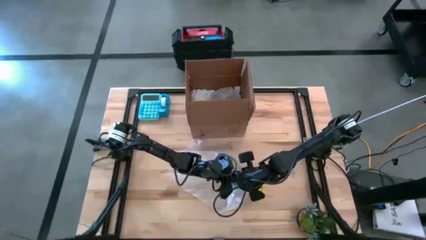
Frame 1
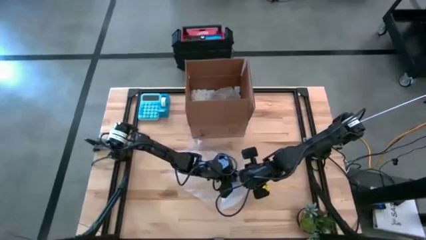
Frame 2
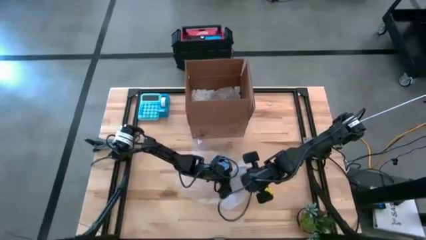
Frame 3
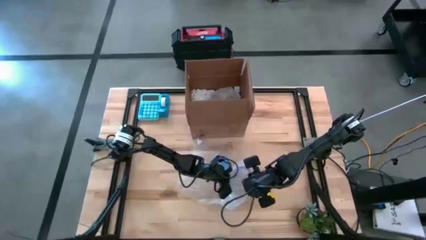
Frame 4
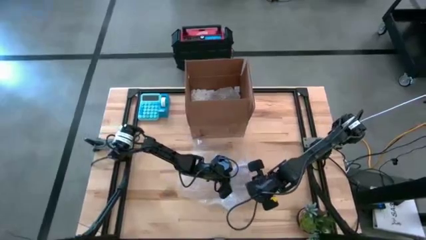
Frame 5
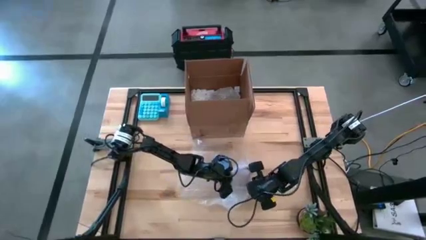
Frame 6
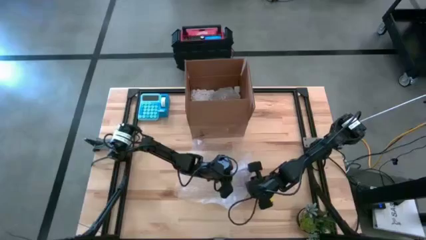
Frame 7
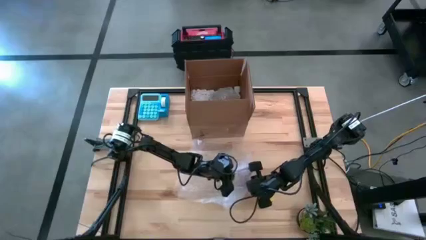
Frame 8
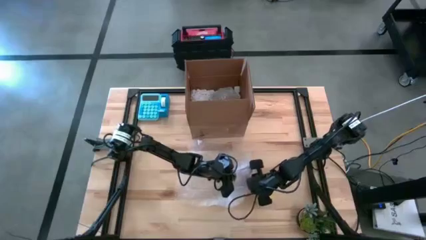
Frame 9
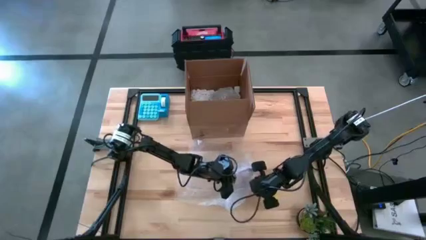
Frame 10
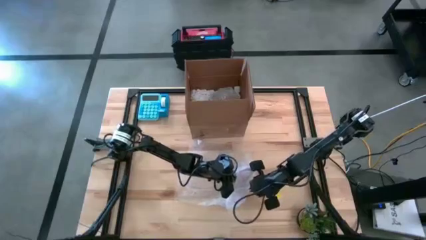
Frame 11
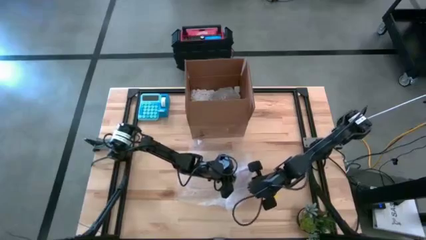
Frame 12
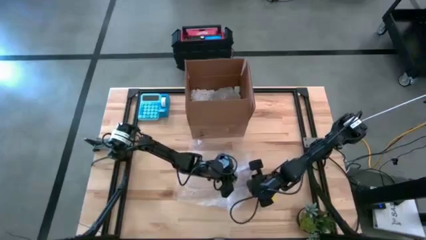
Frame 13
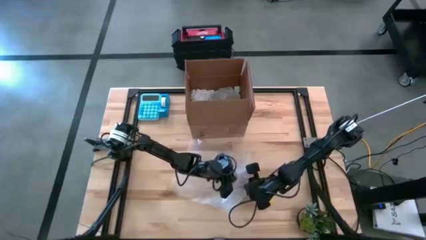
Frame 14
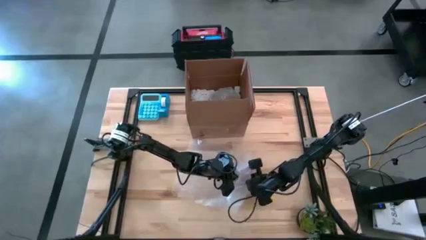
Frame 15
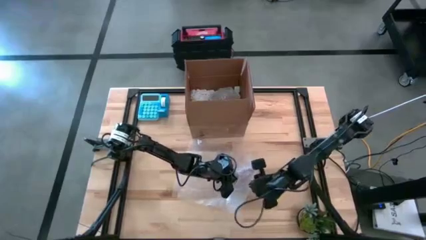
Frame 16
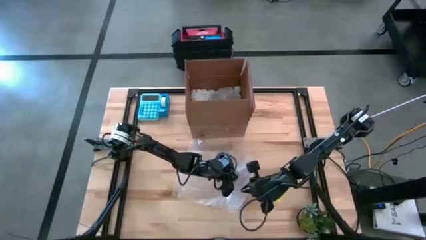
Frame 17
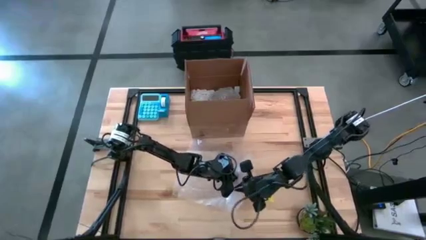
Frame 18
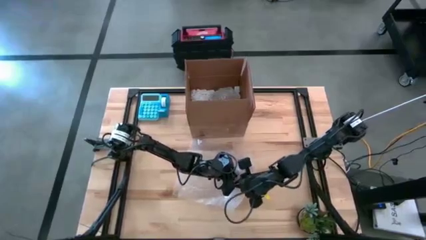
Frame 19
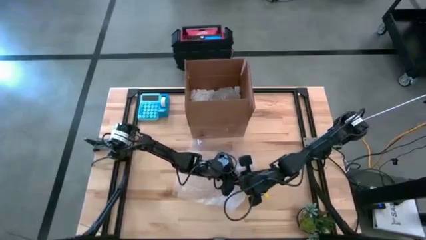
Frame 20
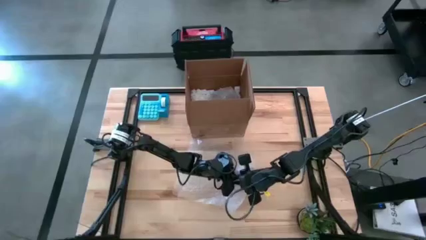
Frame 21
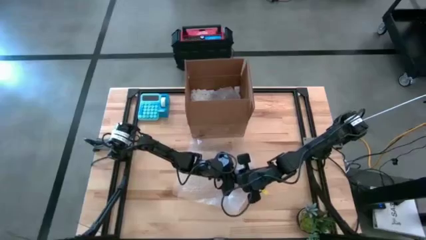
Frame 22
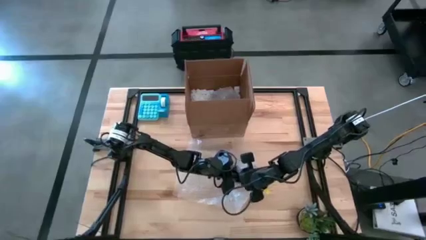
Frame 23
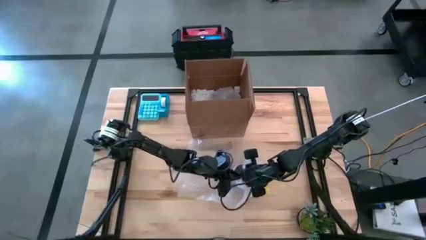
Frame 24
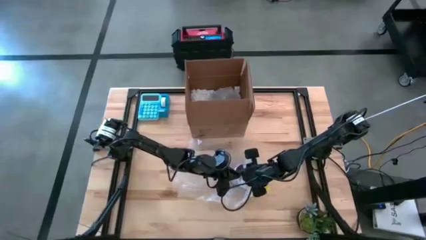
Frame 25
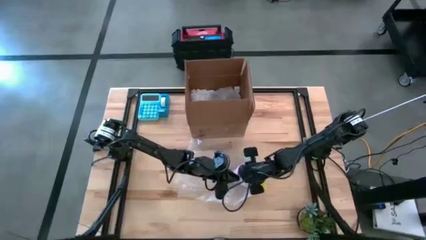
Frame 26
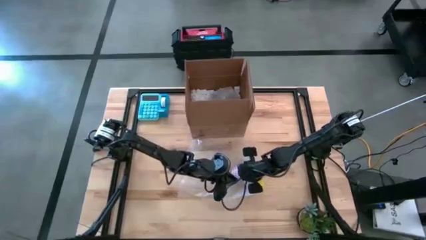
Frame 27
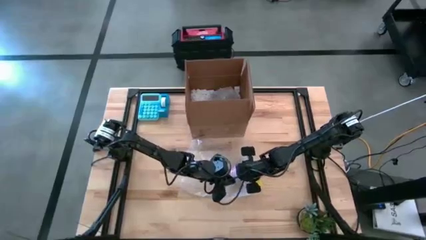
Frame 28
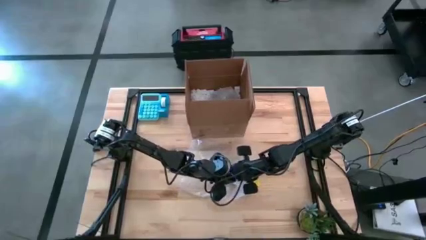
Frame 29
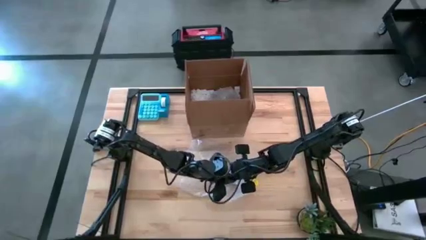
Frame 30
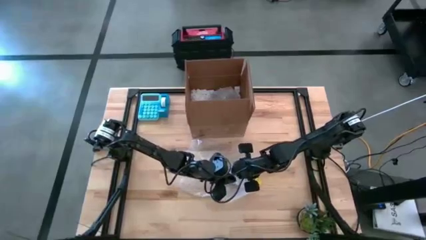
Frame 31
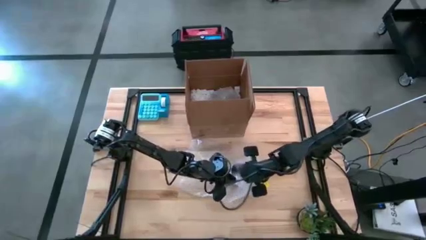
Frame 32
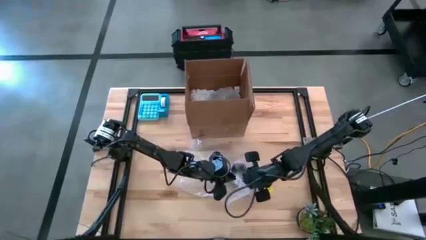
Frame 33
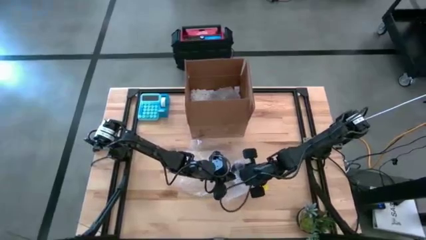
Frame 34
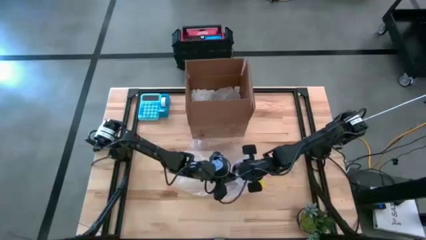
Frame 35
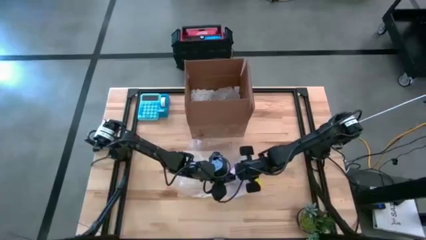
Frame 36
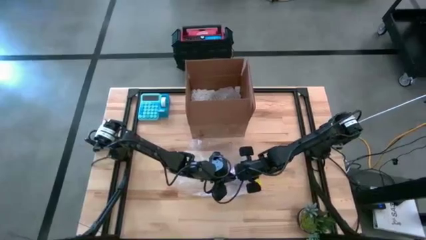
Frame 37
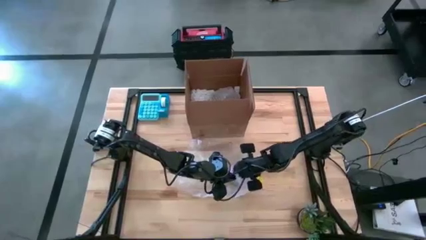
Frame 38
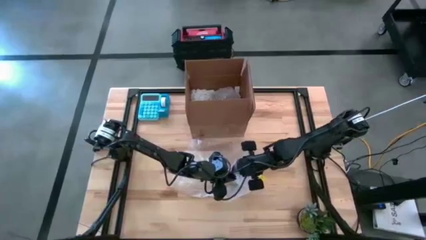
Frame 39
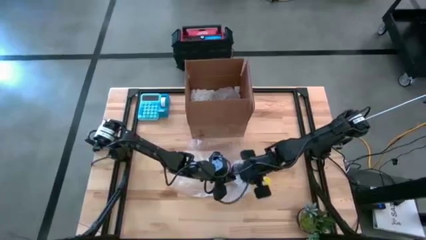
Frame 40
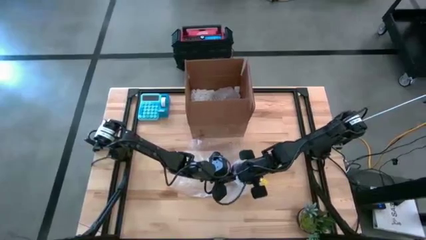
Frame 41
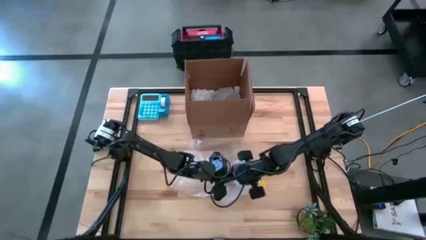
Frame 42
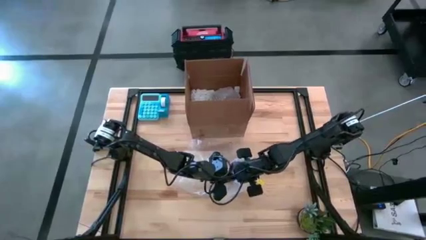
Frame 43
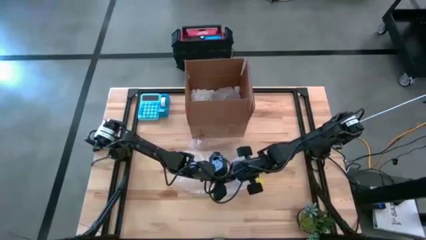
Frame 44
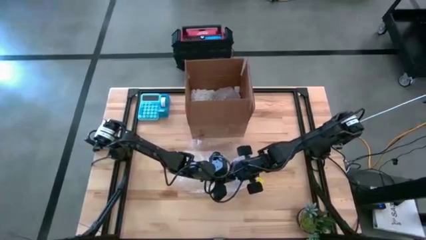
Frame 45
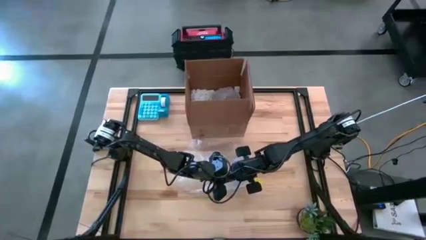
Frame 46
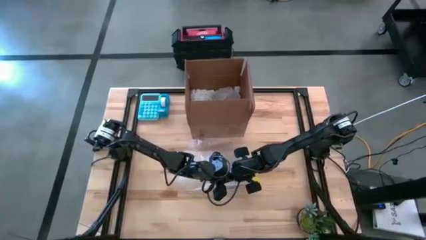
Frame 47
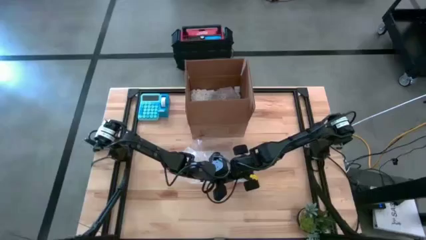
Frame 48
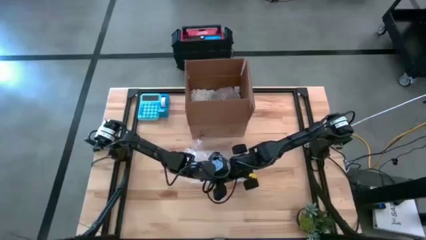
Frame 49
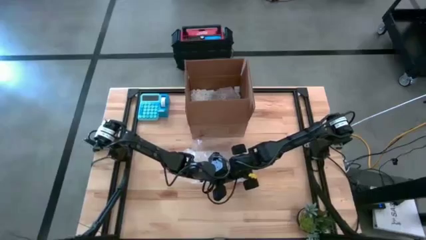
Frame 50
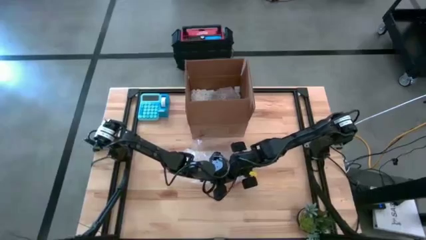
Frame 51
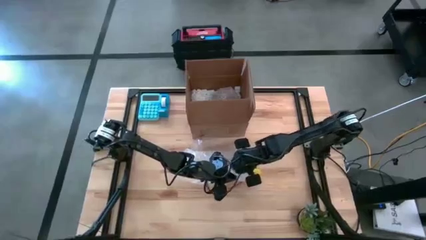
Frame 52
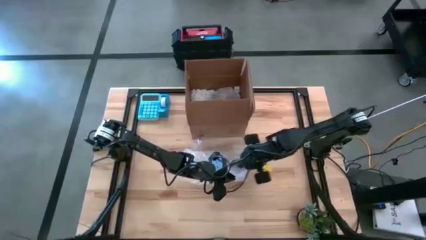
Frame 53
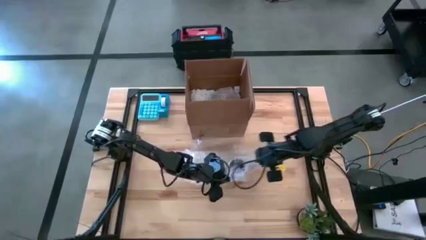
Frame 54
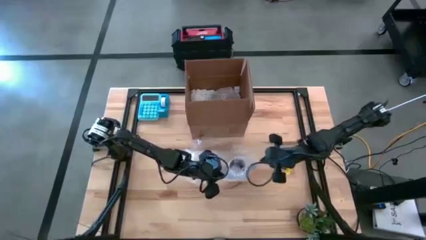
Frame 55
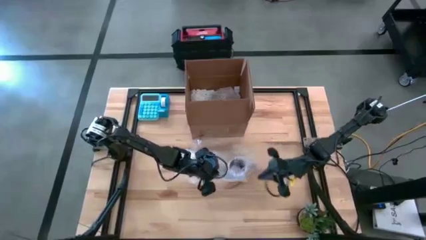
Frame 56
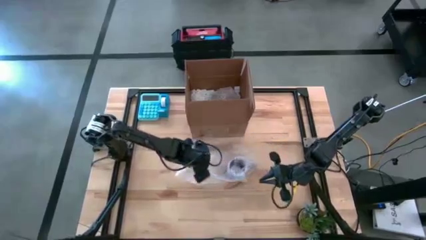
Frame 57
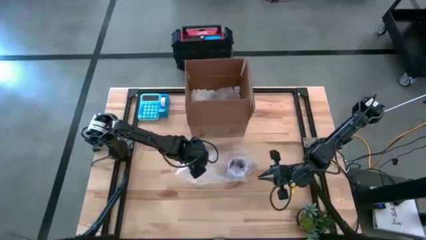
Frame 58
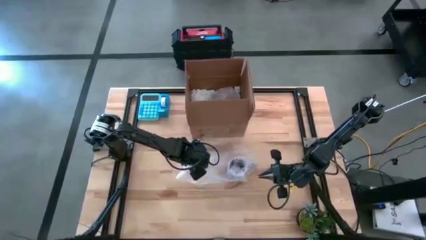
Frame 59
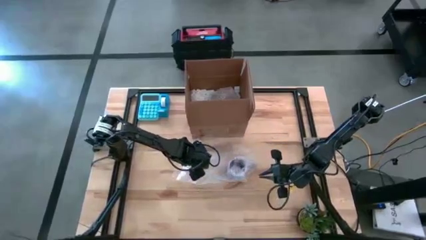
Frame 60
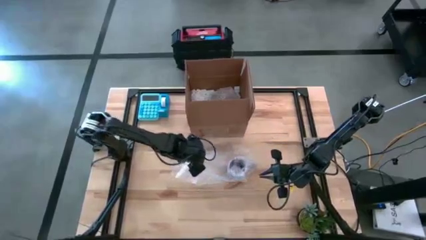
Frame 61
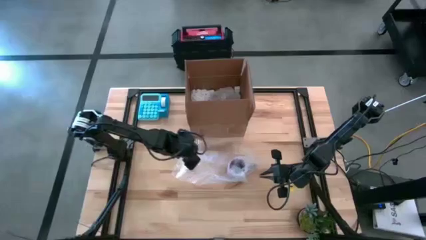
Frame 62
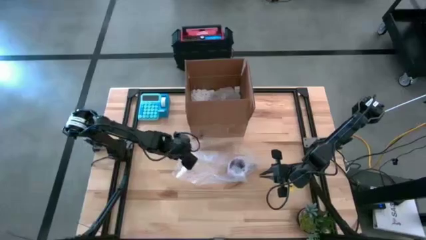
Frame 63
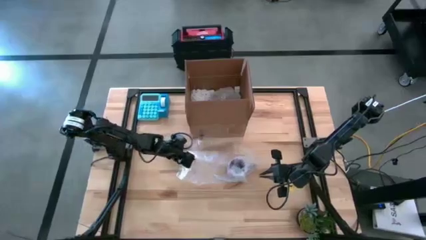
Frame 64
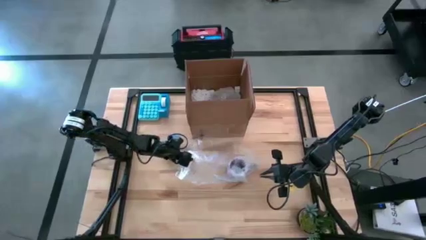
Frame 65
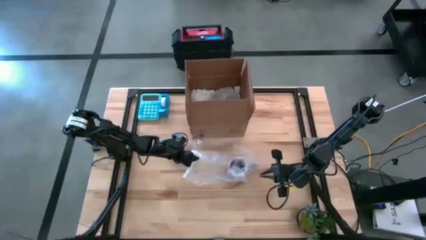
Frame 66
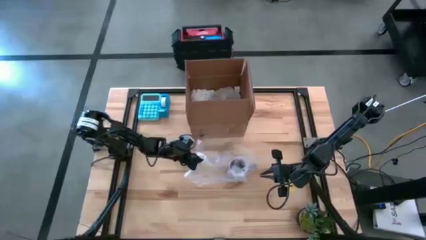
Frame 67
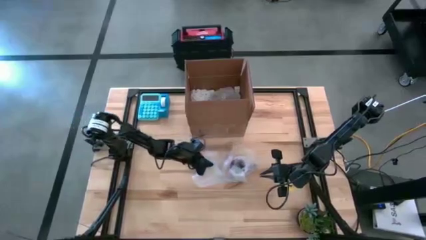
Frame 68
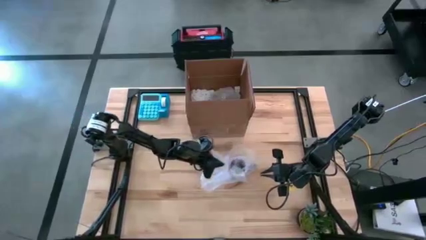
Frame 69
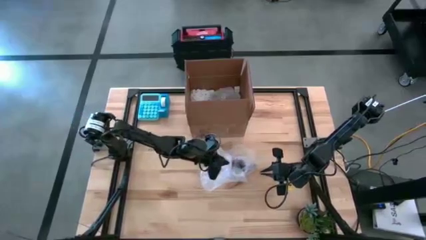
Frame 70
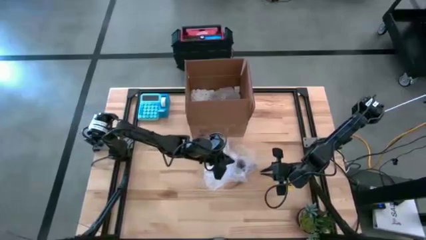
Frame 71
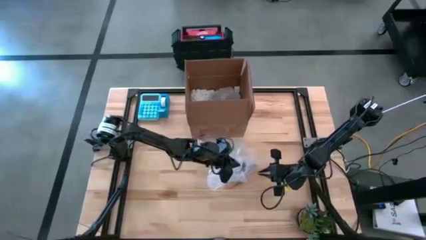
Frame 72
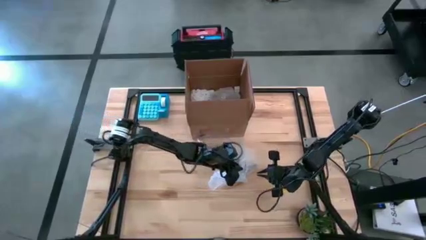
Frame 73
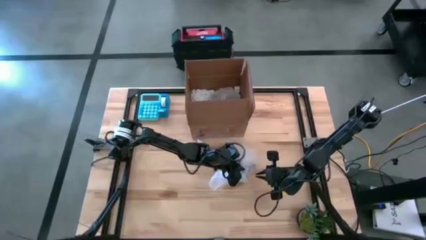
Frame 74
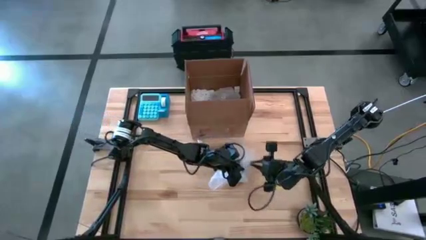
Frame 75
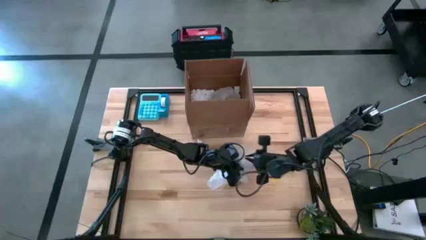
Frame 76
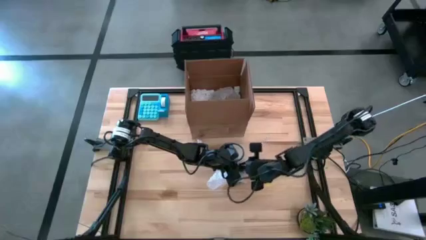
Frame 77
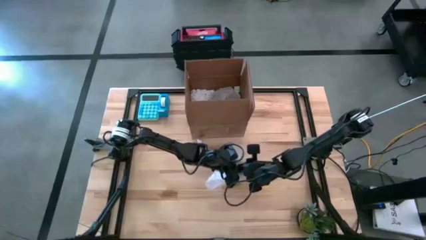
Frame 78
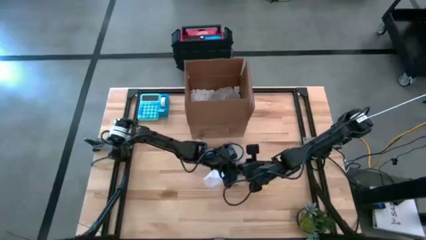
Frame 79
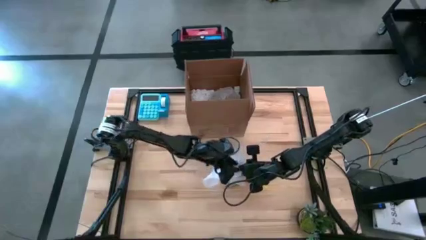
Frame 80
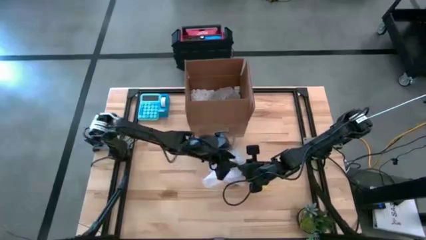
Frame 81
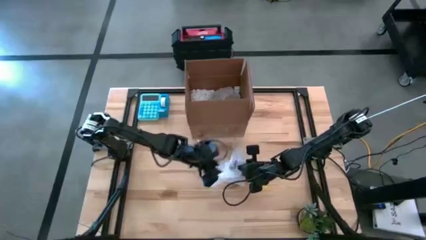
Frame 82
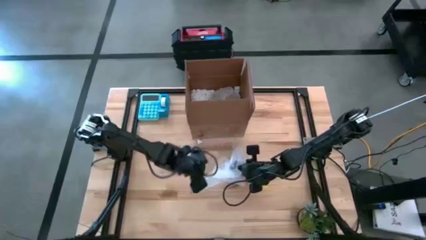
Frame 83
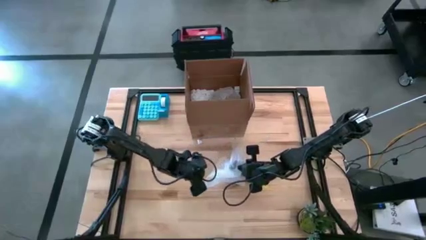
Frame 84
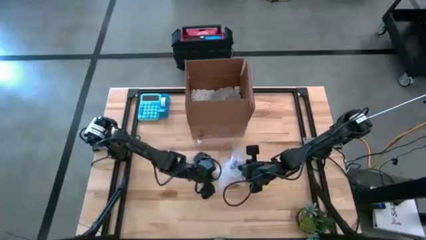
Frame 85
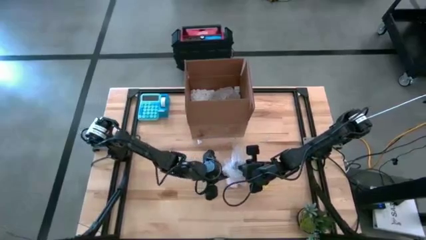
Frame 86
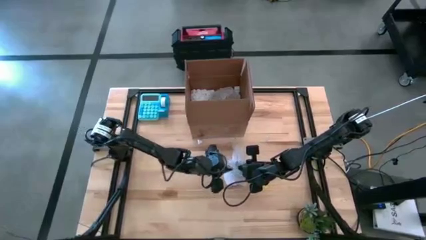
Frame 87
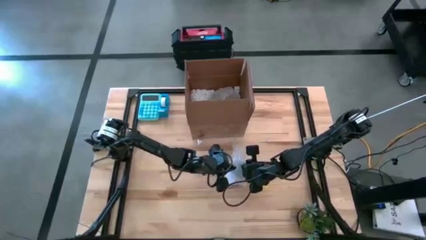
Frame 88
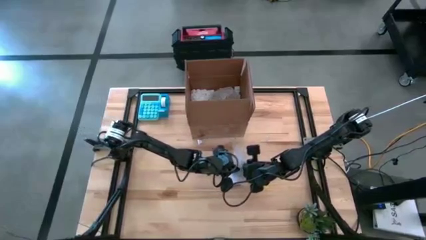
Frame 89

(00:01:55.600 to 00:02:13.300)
Task: wrap mug
Wrap the purple mug with bubble wrap
